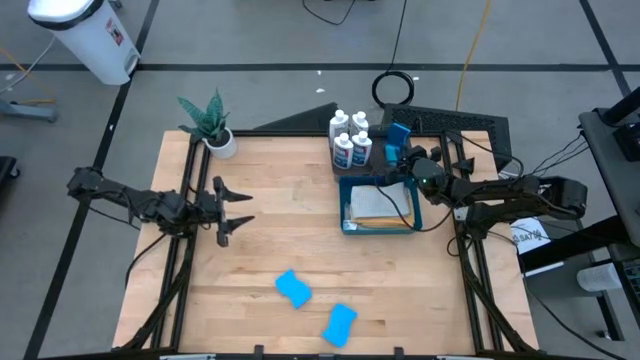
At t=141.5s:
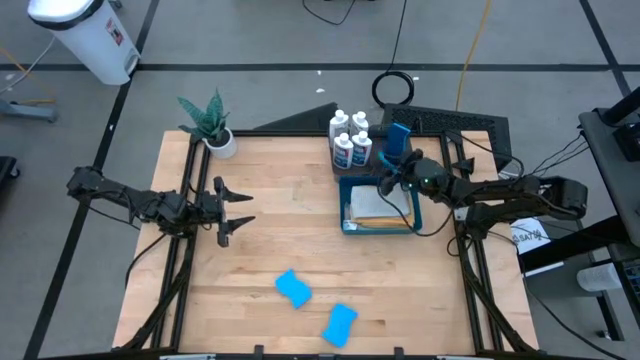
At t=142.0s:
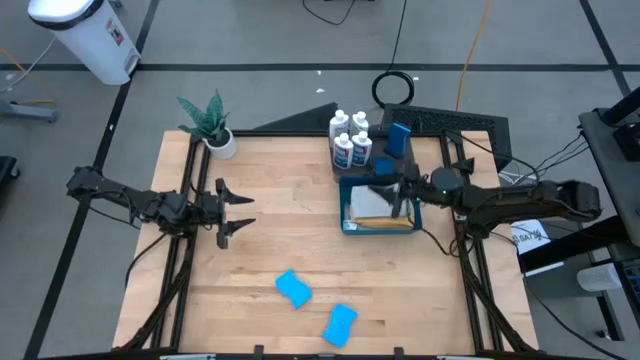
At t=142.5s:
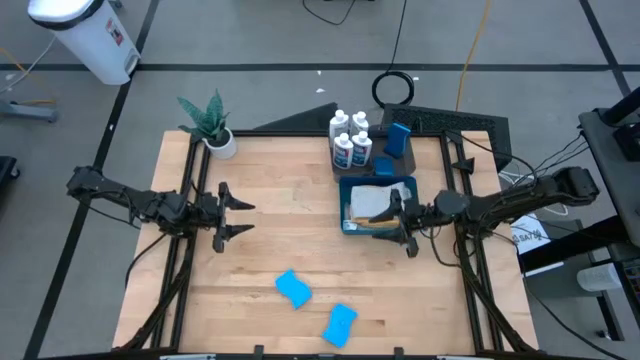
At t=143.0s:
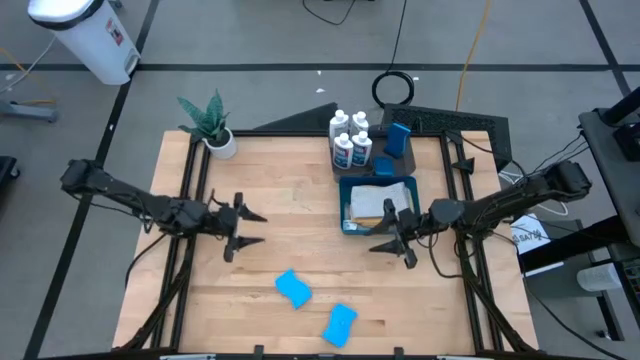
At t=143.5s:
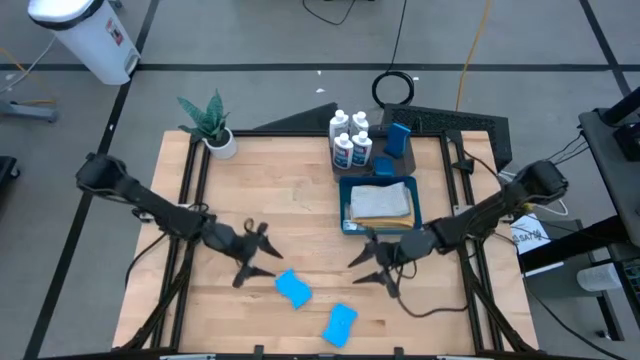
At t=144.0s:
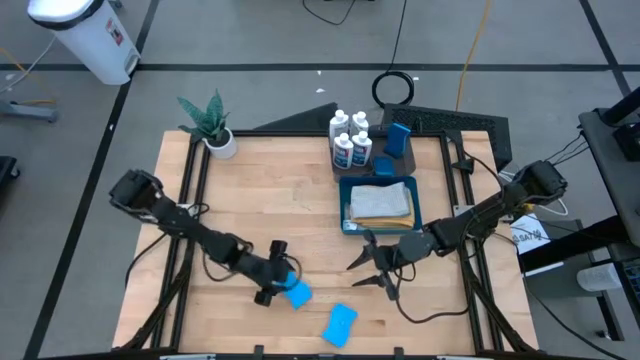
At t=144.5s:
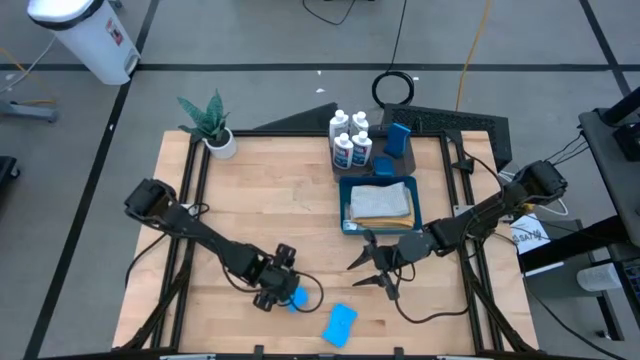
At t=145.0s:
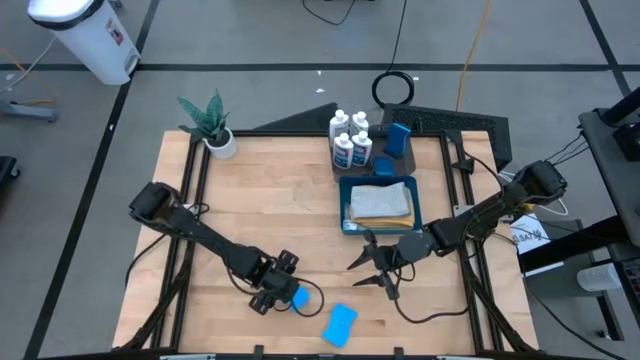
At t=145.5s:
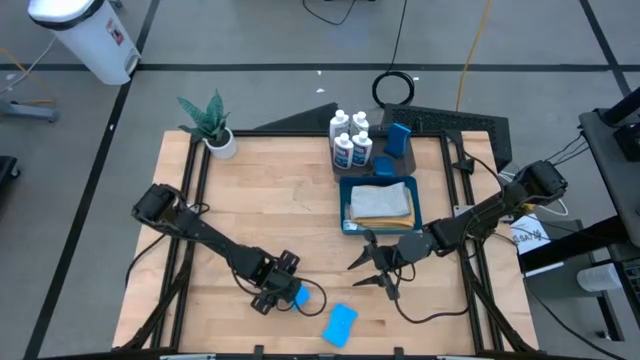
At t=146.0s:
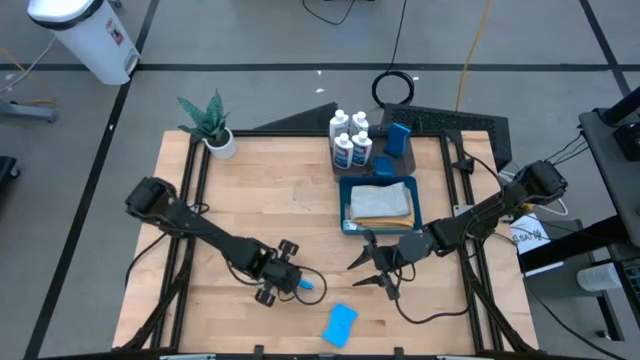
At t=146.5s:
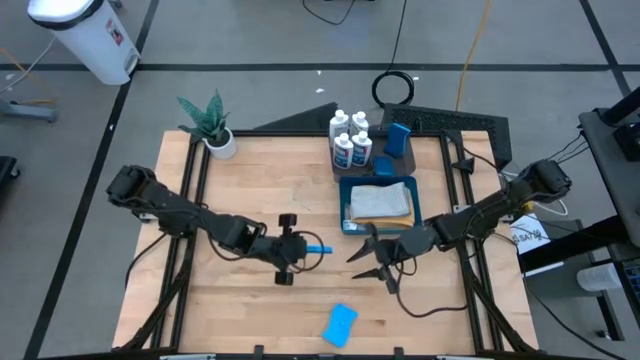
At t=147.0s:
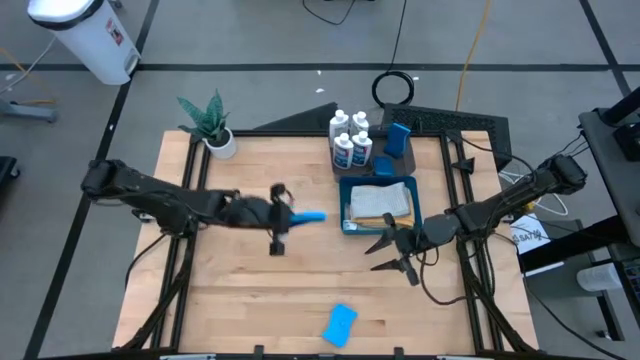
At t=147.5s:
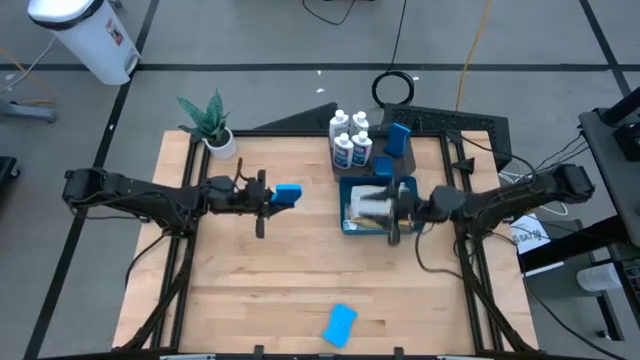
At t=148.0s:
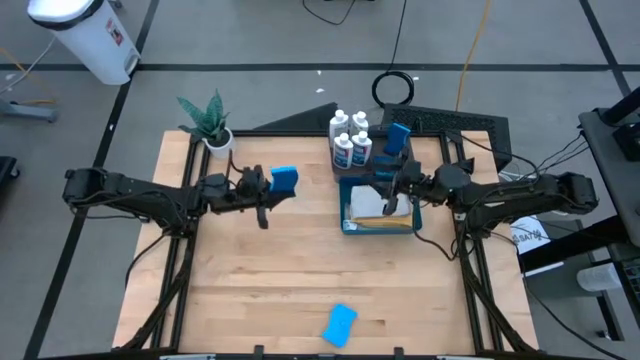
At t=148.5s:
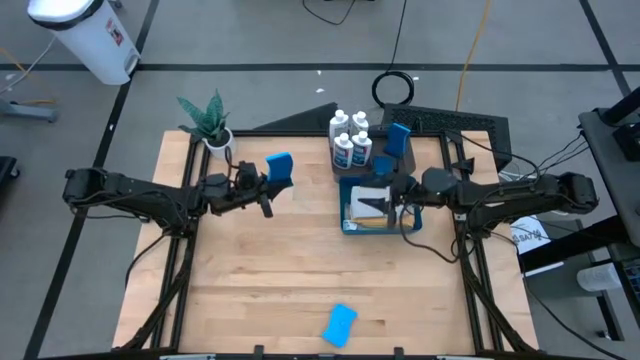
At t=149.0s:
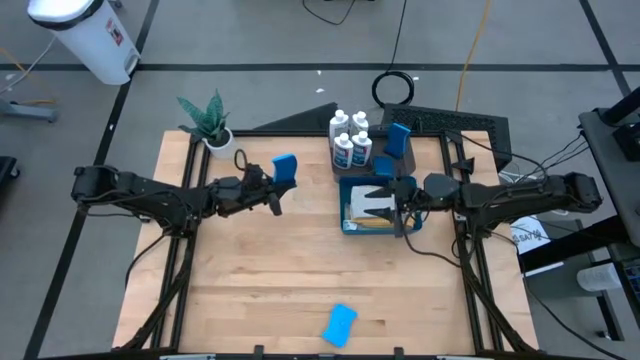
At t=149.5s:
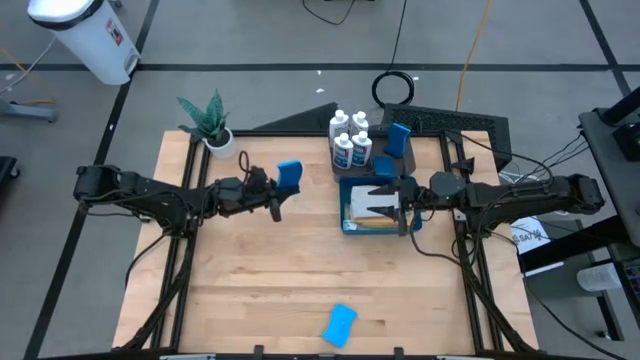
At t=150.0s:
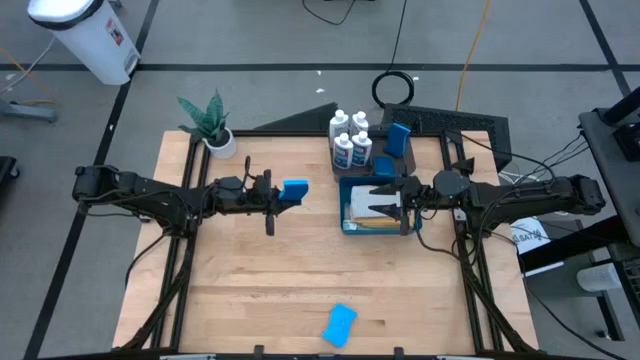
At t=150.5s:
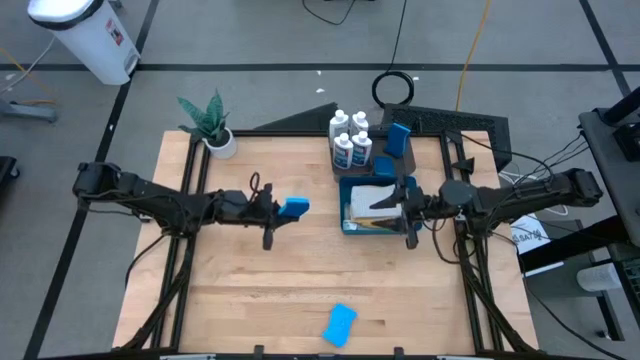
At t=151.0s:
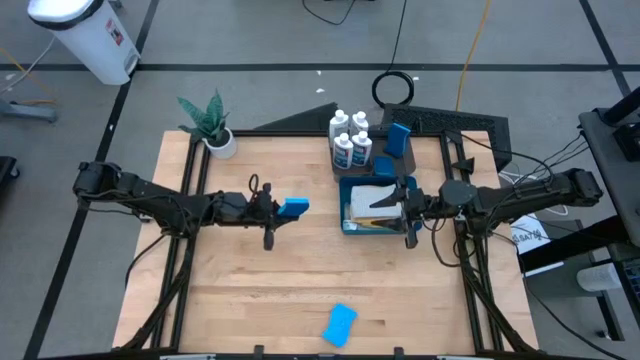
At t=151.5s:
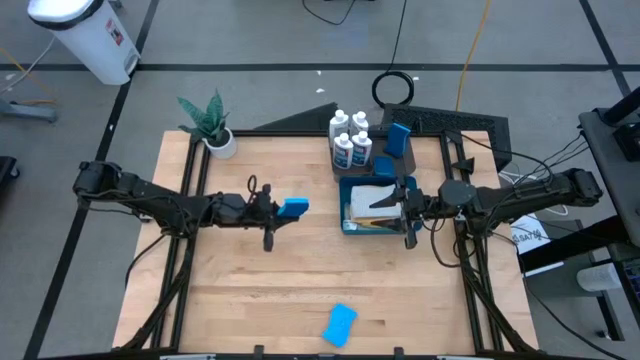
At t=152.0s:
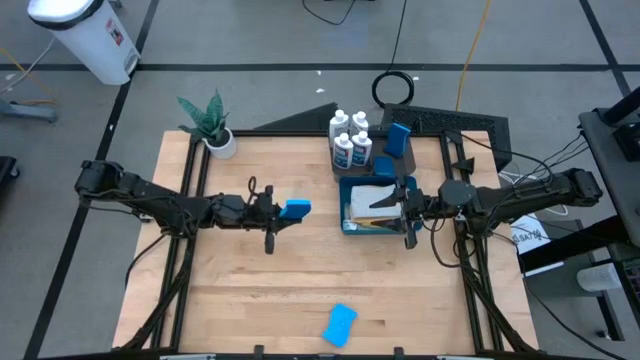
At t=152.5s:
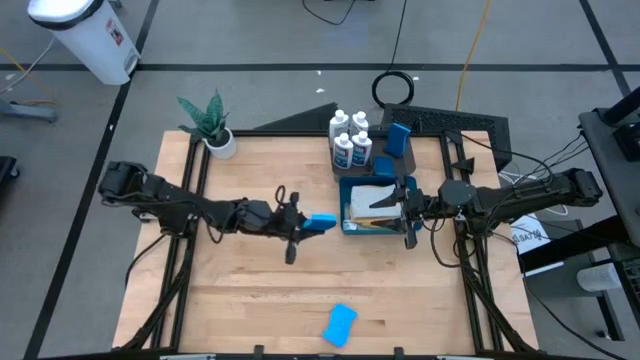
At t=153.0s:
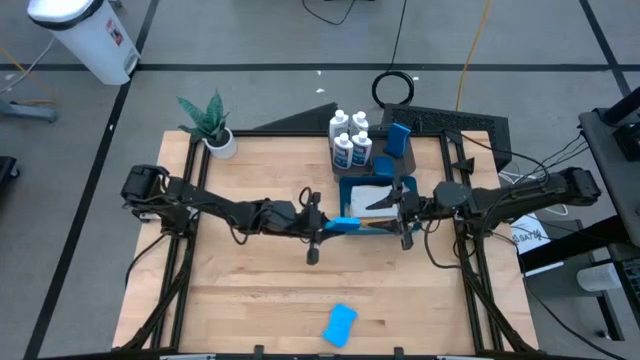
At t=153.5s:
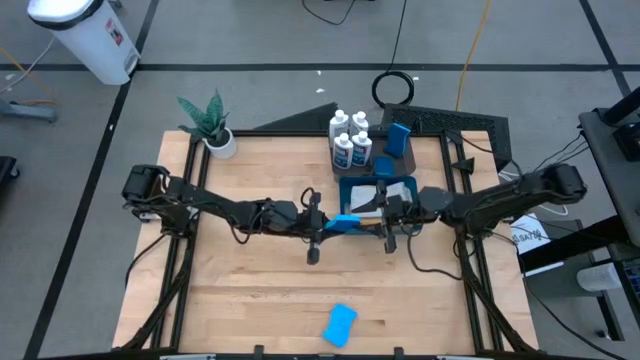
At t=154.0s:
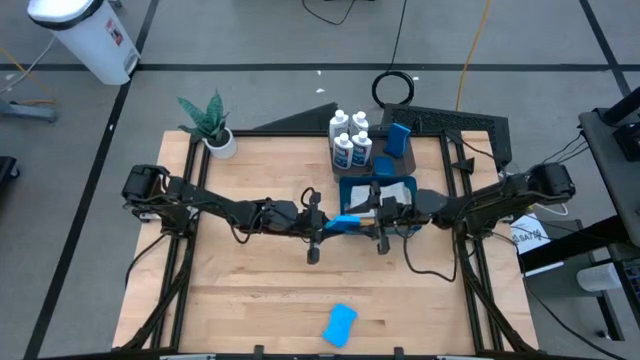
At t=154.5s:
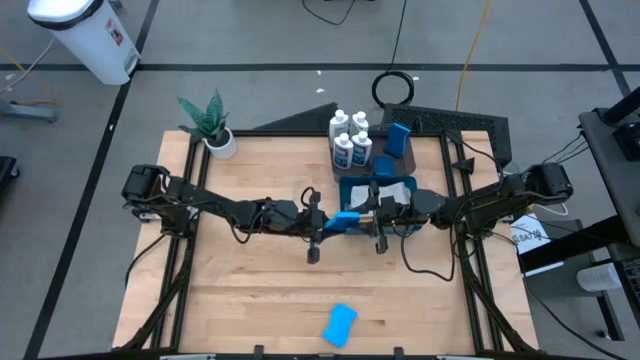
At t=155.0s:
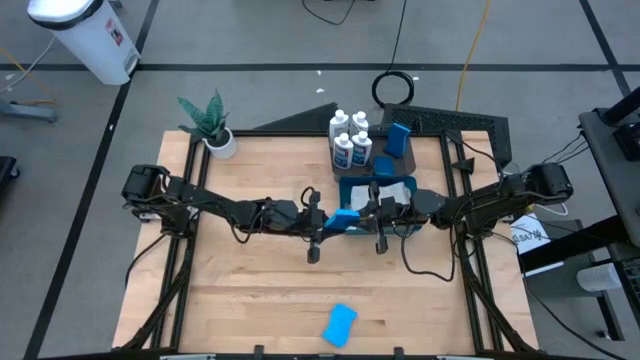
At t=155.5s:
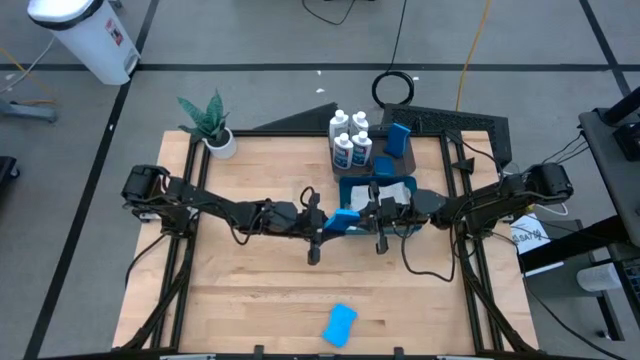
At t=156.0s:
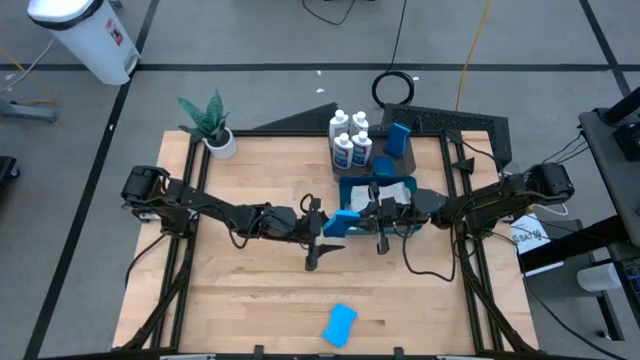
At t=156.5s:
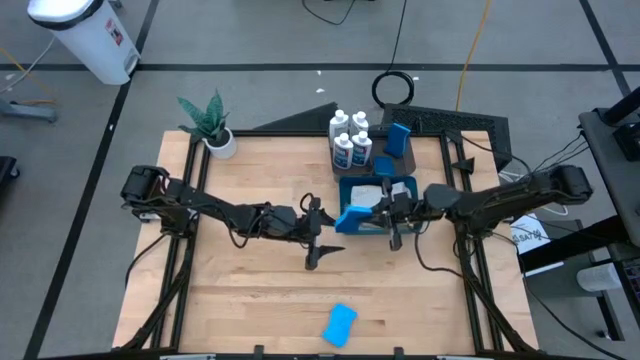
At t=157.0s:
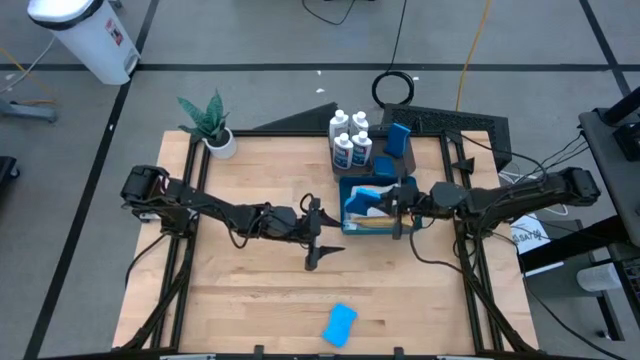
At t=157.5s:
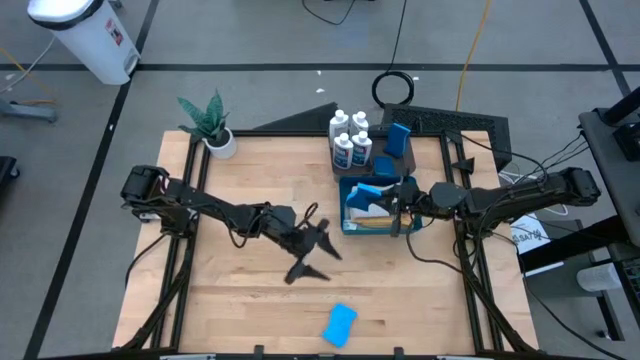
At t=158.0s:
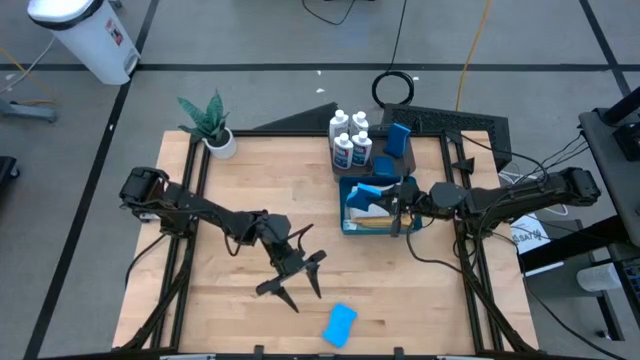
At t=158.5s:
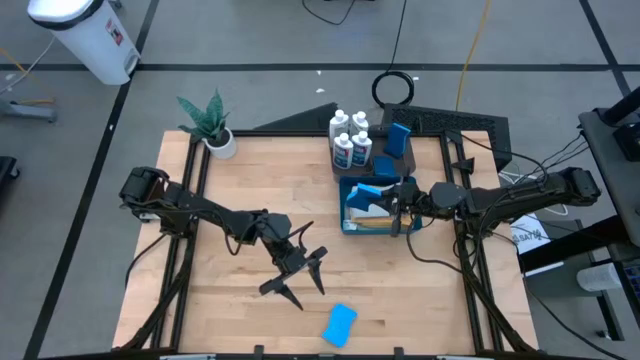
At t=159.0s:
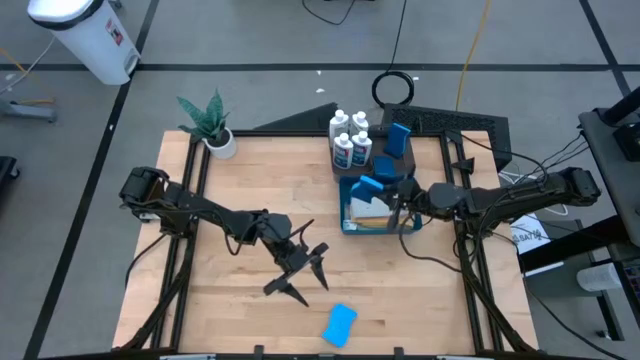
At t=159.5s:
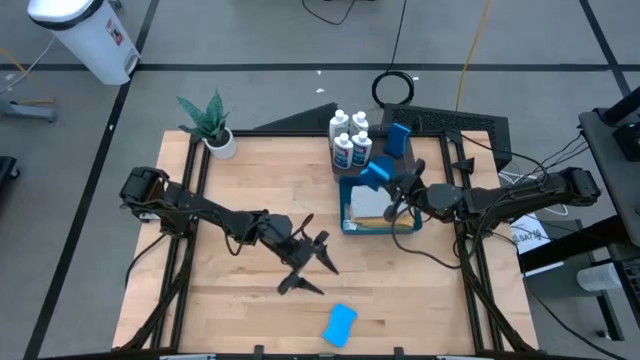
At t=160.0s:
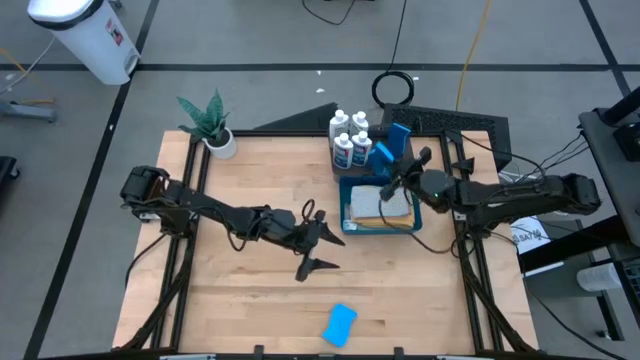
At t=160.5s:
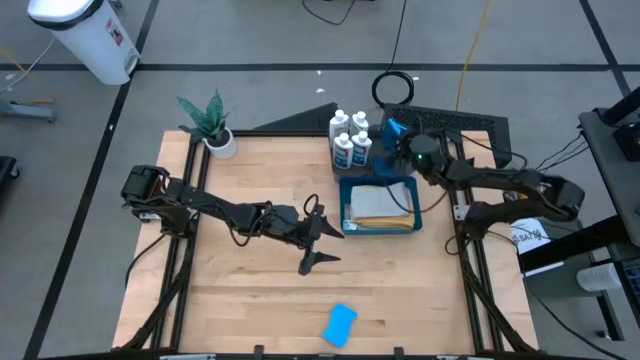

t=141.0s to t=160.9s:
Task: Pick & Place Kitchen Items
Put the blue dishwashing sponge into the right black bin

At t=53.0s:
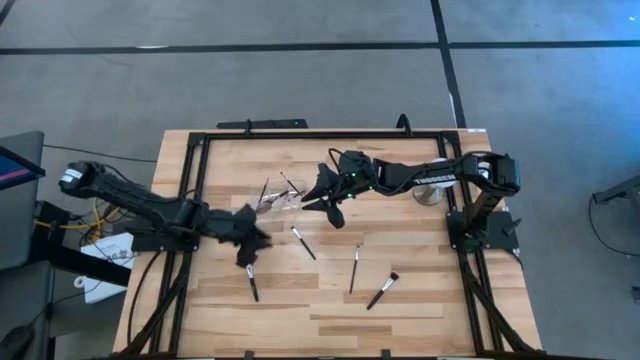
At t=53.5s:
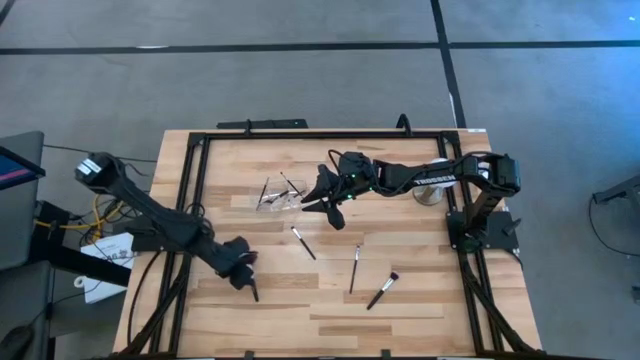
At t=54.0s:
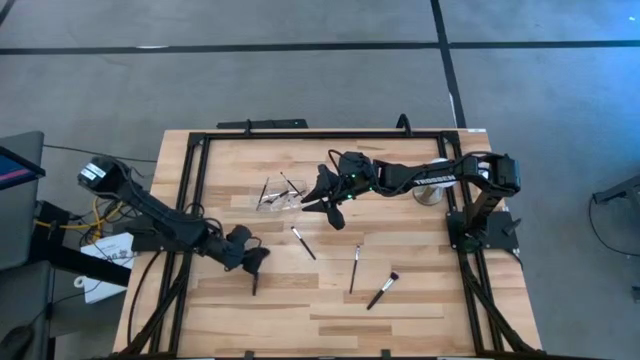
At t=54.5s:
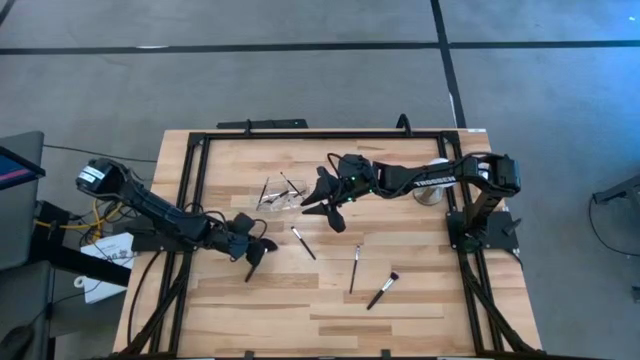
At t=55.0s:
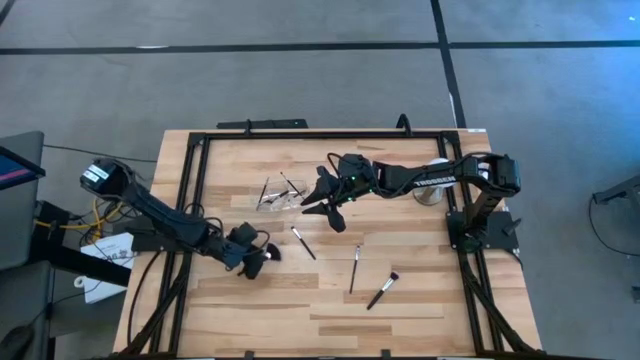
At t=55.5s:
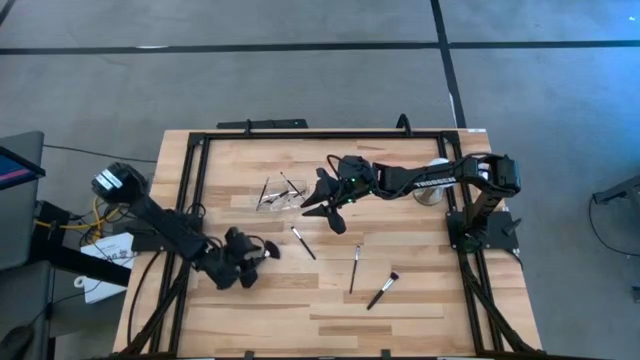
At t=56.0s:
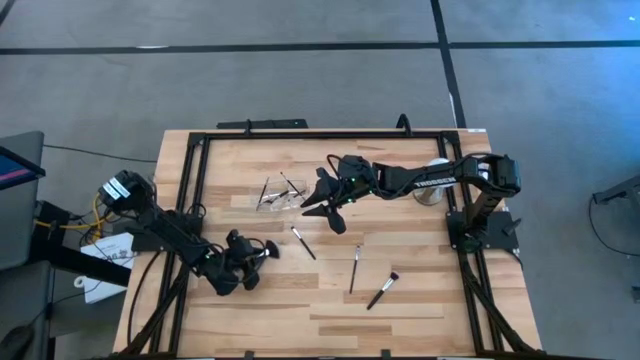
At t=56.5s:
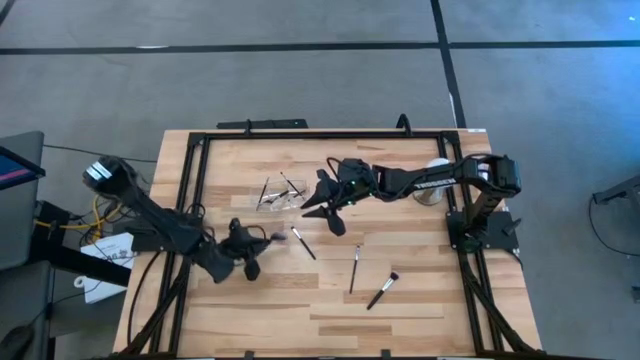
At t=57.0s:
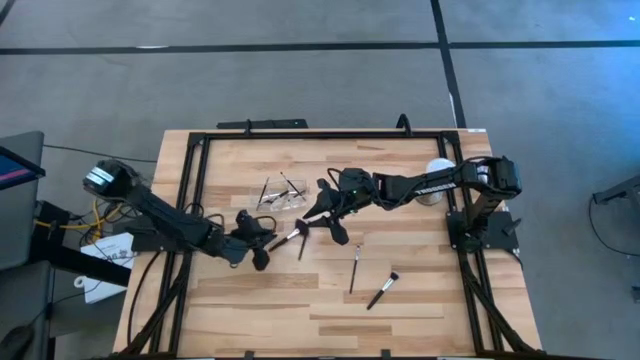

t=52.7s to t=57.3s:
Task: Put items in baskets/containers
Put the highlighter brush into the transparent organizer
